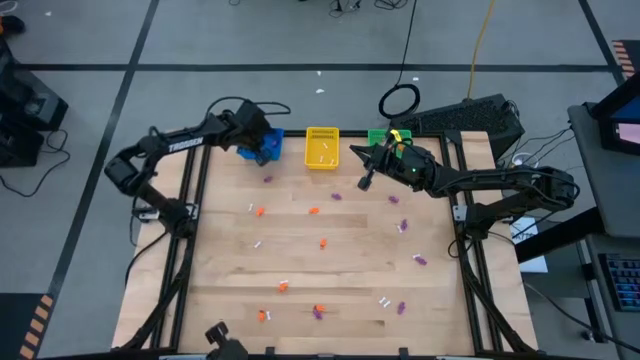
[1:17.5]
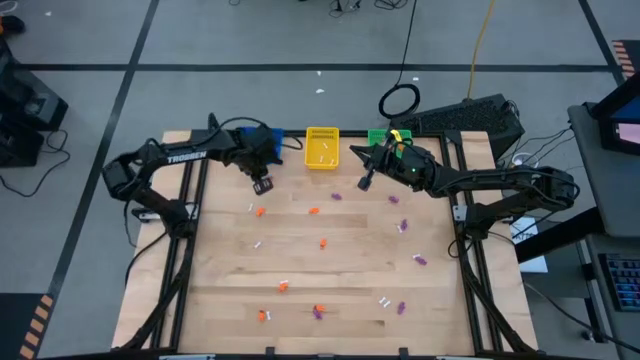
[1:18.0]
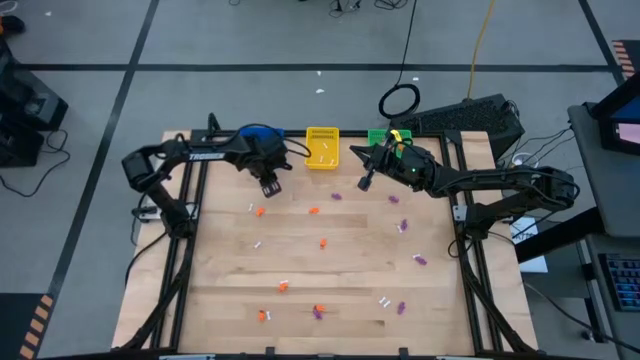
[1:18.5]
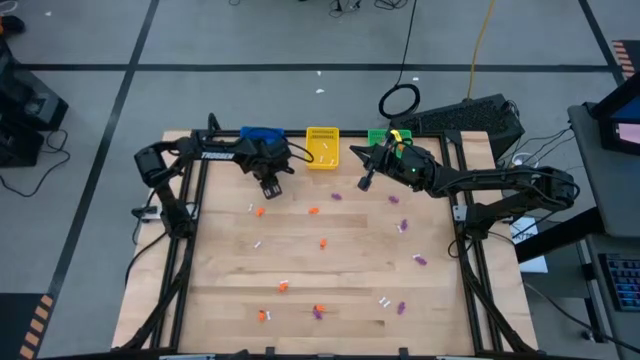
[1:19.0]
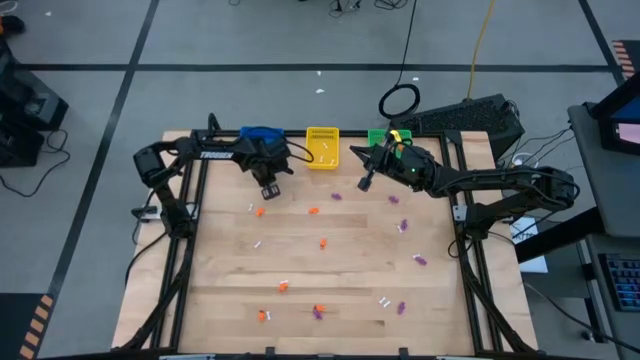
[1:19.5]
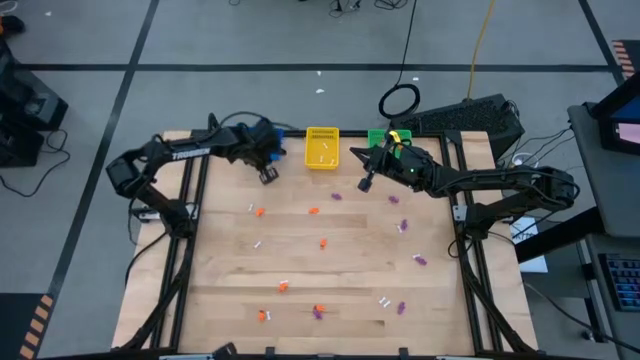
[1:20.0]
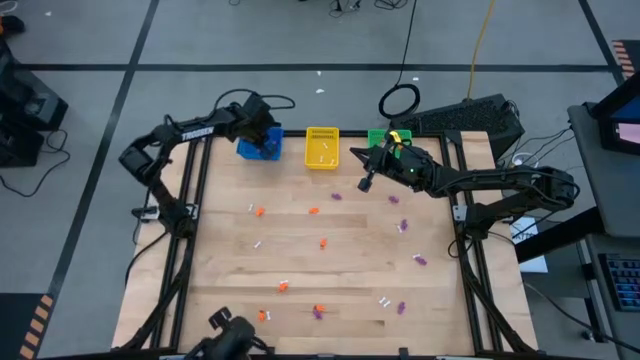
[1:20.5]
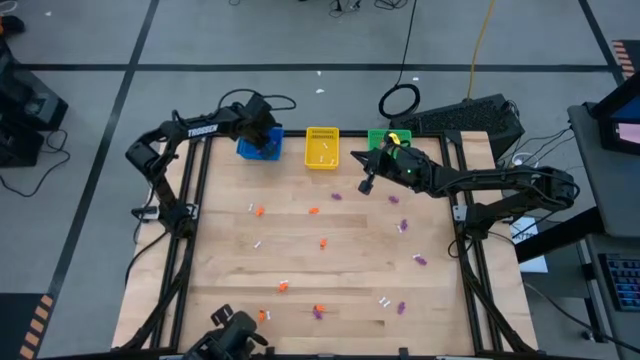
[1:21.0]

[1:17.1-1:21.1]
Task: Sort Halloween decoration
Put the violet skeleton toy into the blue bin

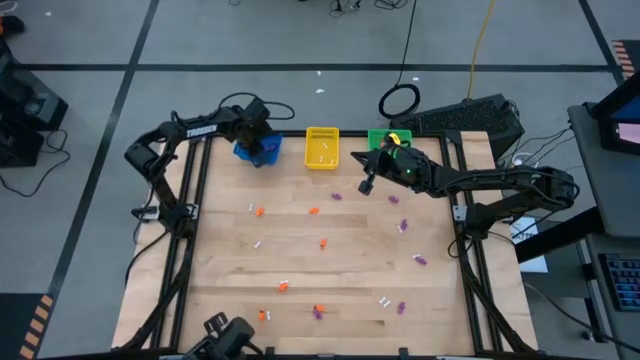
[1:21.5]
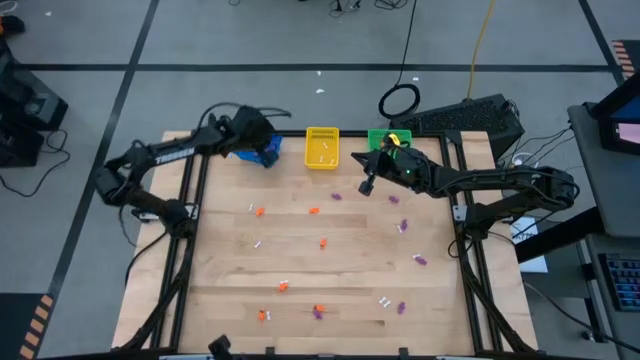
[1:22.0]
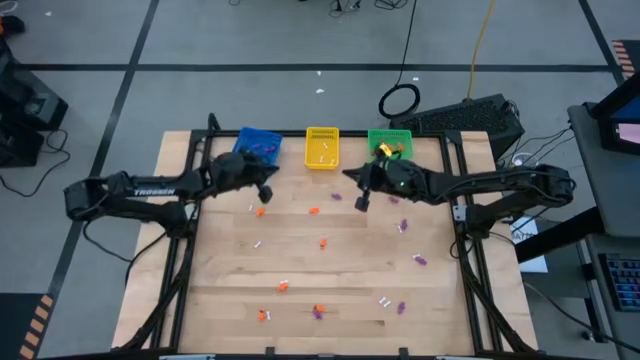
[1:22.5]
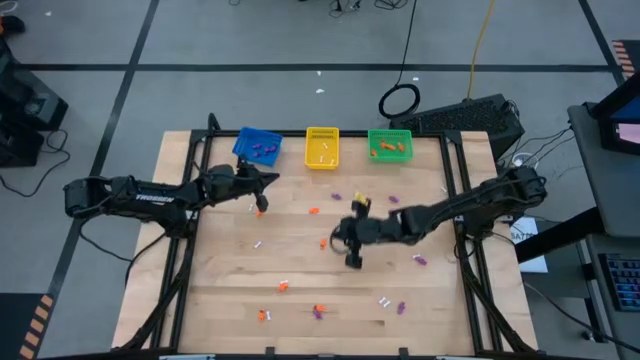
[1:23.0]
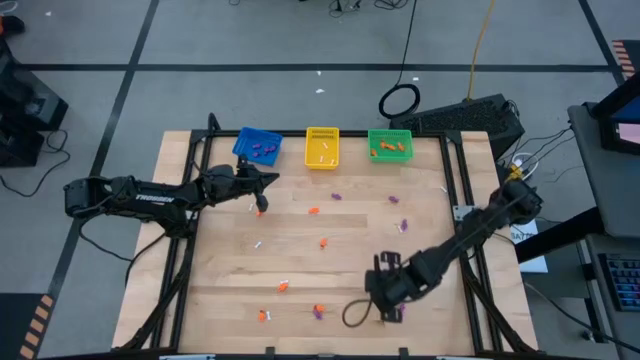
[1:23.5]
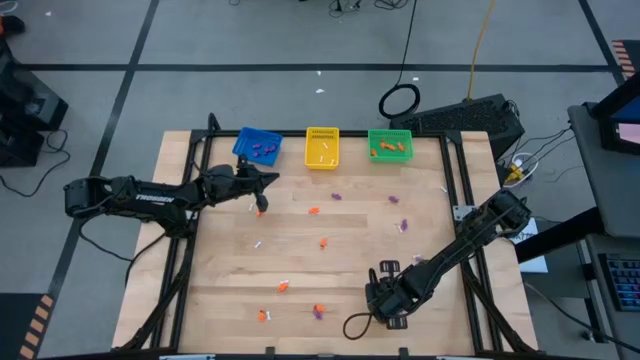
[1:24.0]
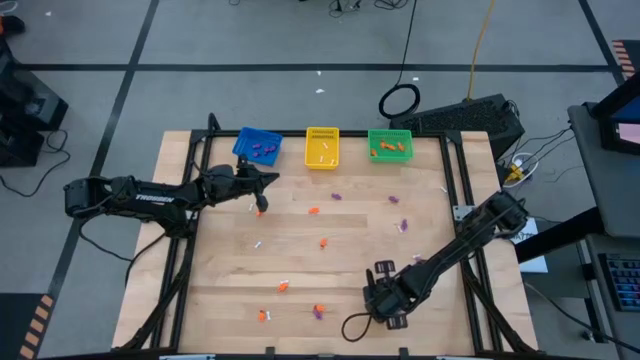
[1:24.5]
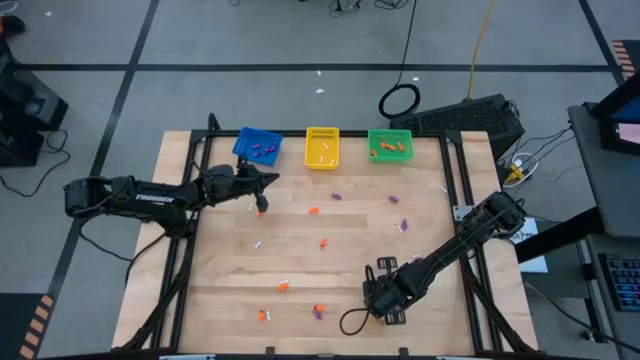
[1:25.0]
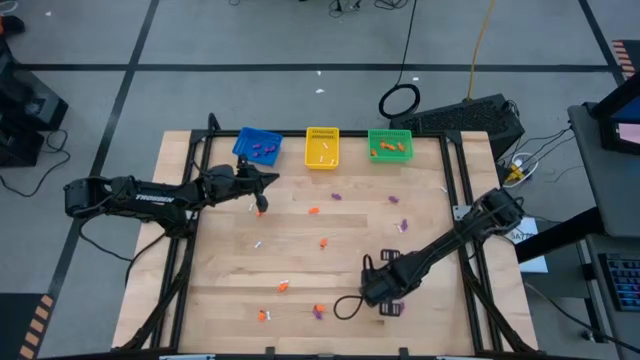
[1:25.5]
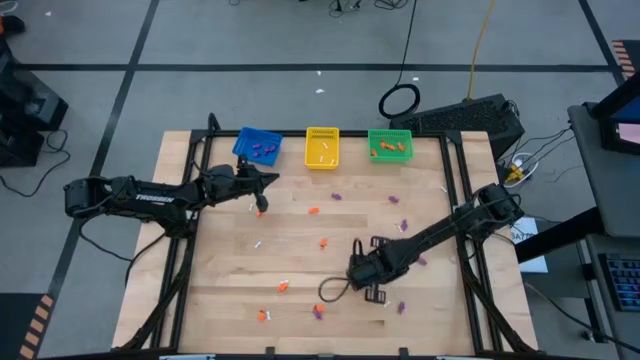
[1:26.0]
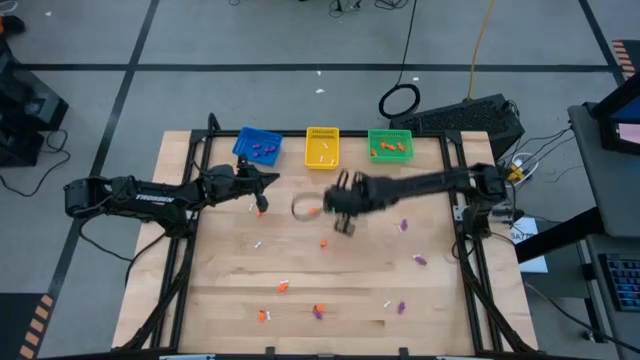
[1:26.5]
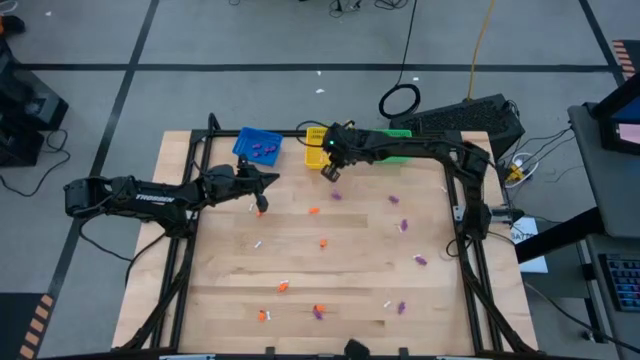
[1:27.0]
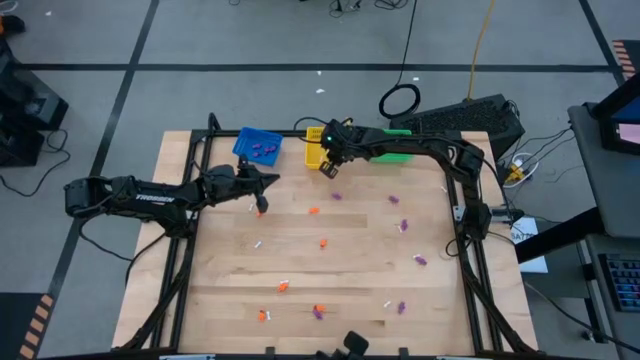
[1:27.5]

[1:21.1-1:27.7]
Put the white bone toy into the yellow bin

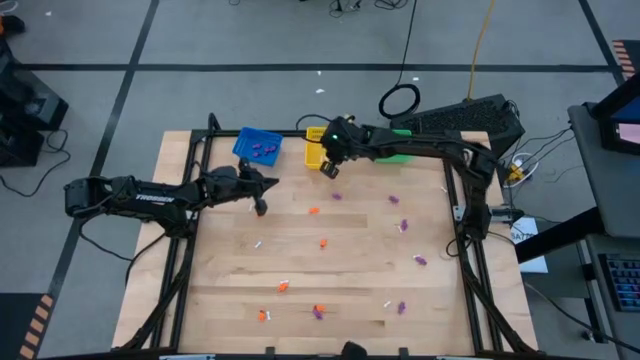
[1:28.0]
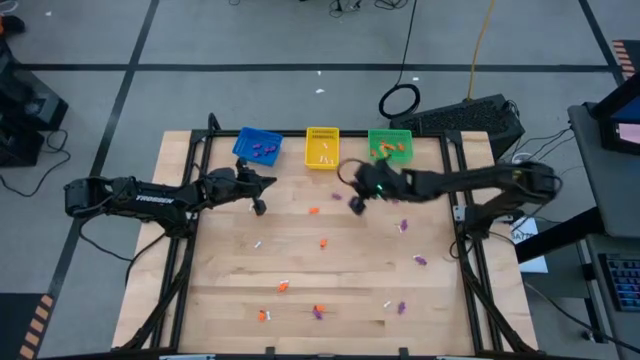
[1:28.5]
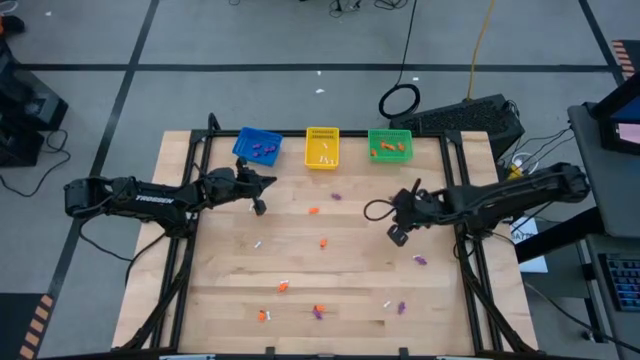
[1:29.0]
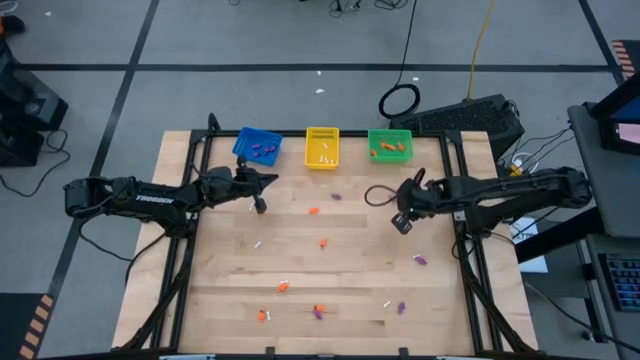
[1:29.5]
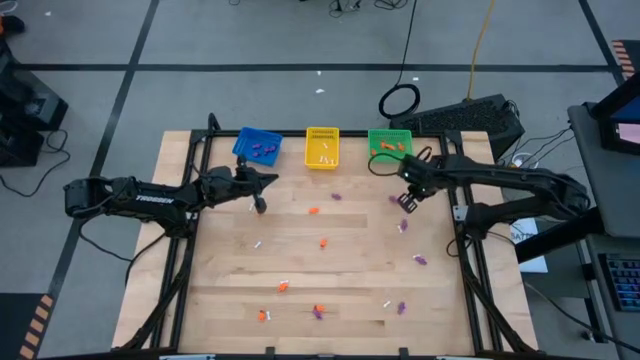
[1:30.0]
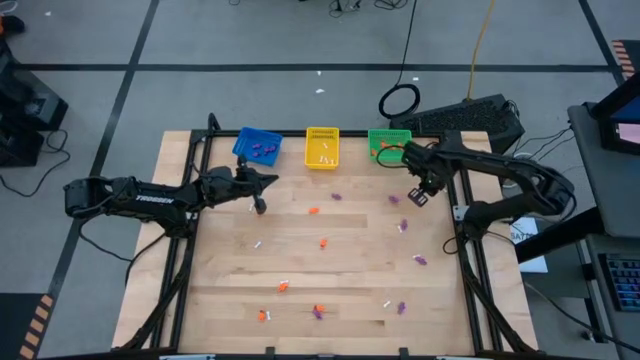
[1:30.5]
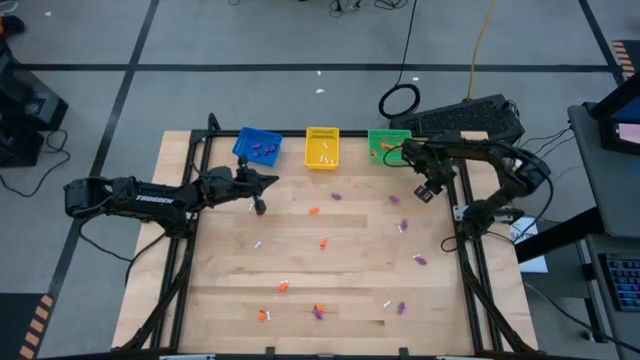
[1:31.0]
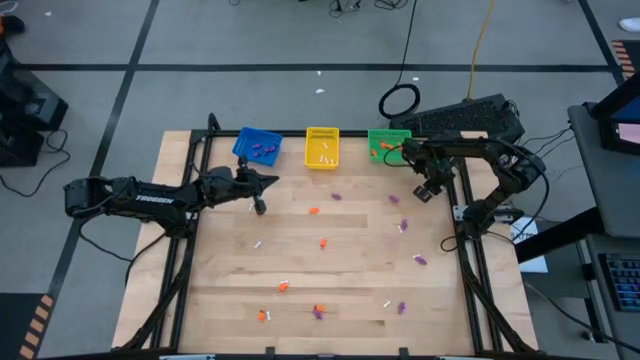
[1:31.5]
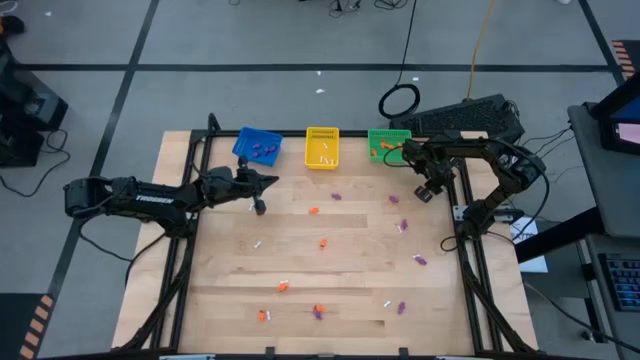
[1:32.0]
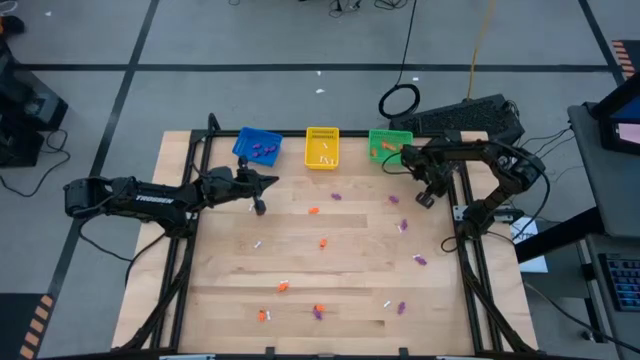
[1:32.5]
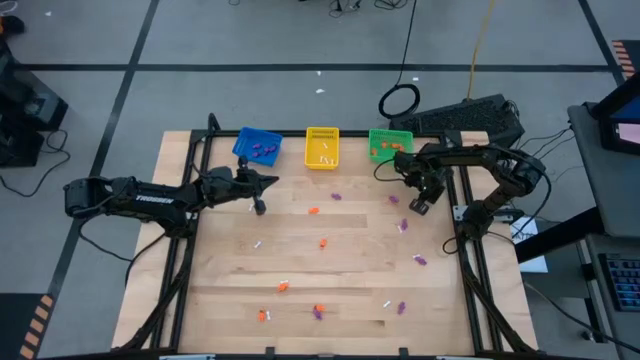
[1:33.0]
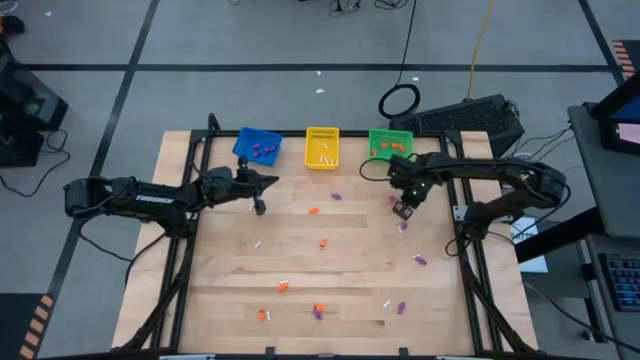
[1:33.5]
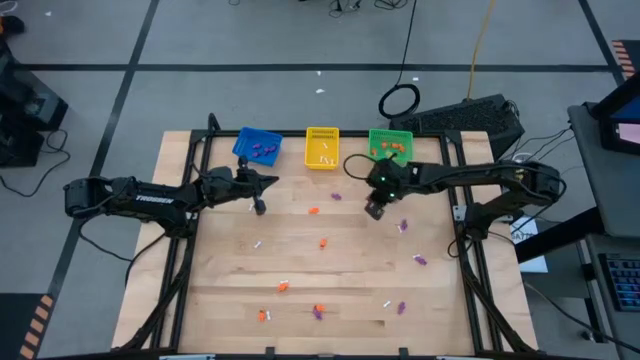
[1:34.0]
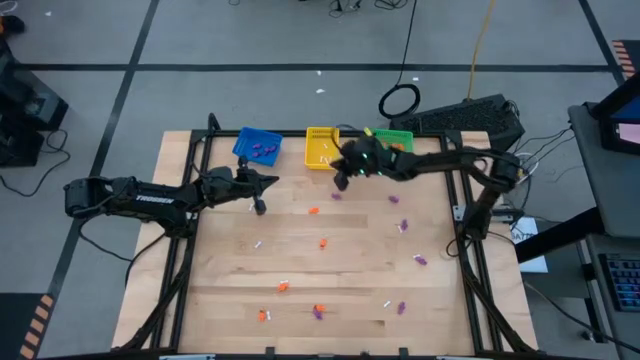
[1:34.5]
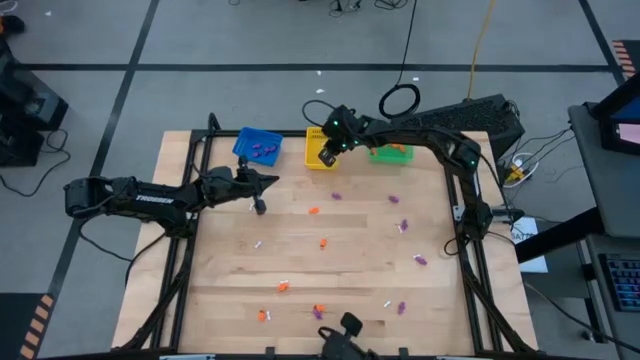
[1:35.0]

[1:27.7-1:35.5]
Put the white bone toy into the yellow bin

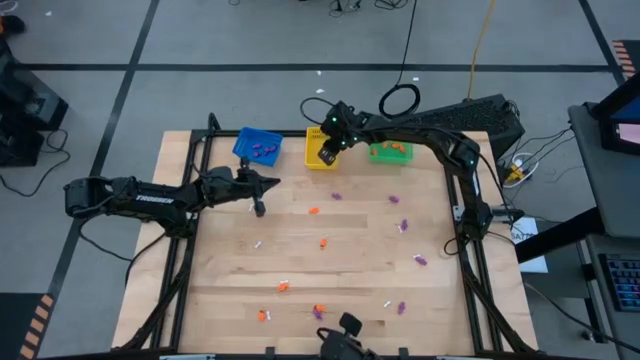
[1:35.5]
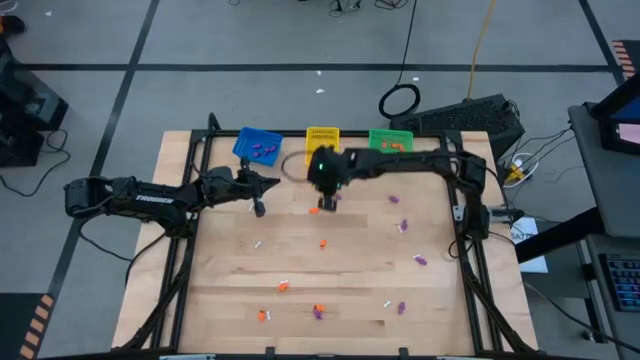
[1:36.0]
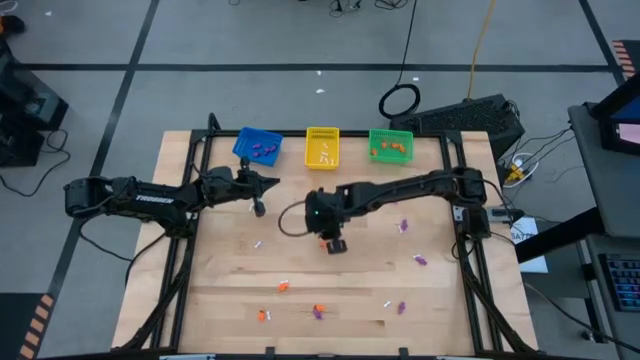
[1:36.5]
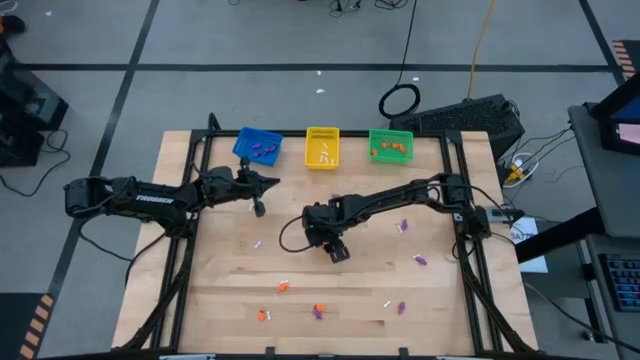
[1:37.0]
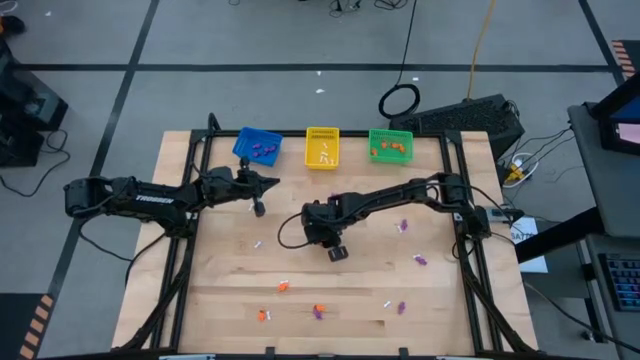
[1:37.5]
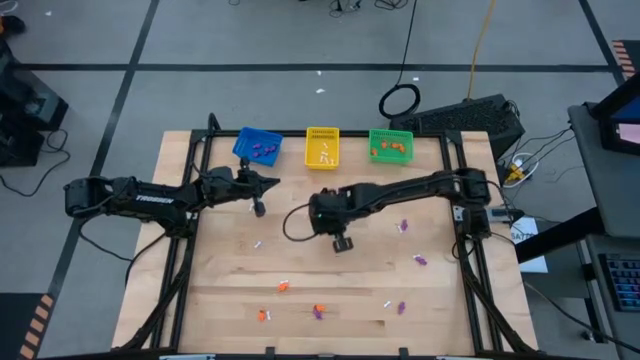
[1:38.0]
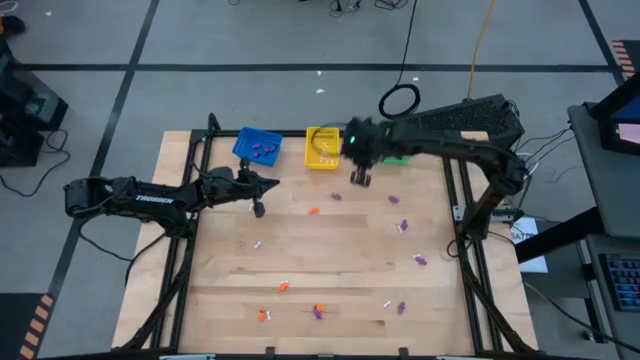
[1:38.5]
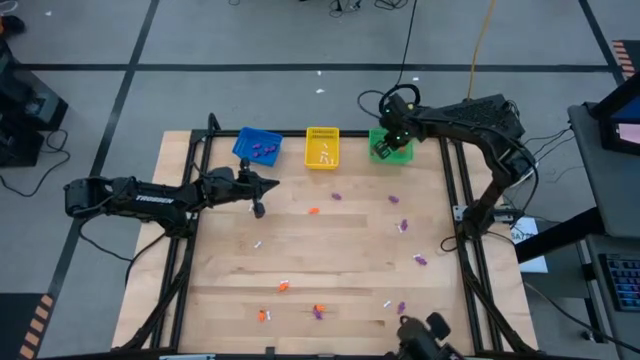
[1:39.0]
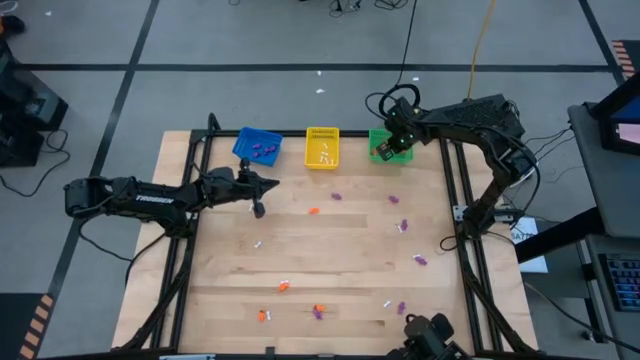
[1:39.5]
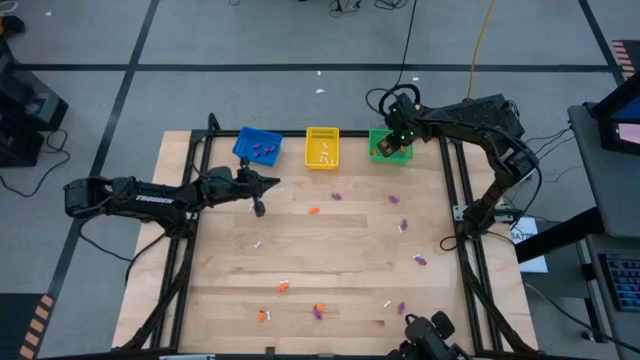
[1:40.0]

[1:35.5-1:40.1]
Put the orange skeleton toy into the green bin
